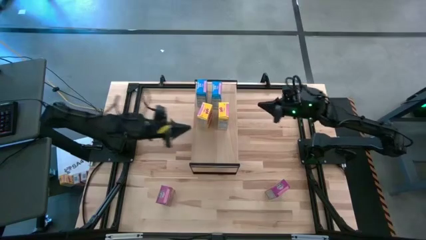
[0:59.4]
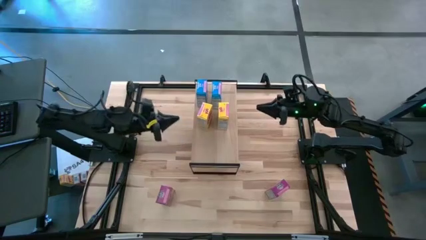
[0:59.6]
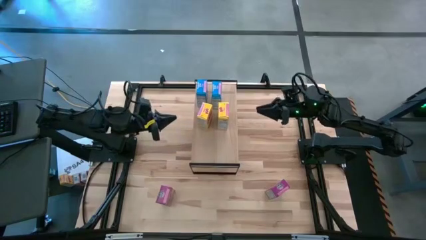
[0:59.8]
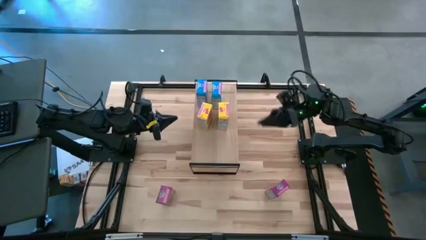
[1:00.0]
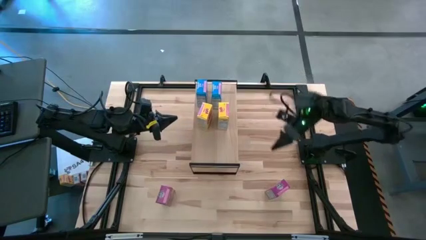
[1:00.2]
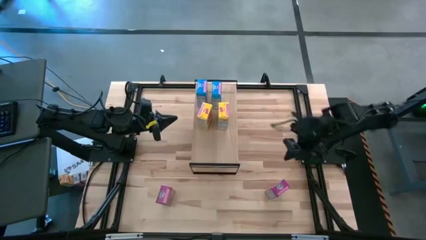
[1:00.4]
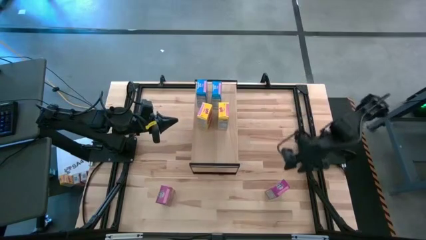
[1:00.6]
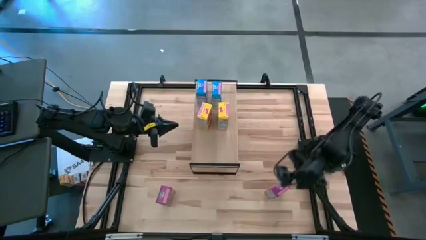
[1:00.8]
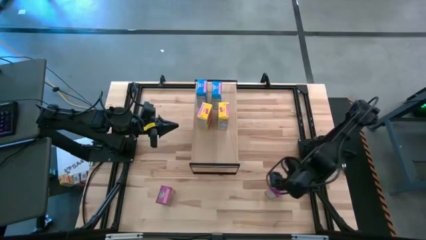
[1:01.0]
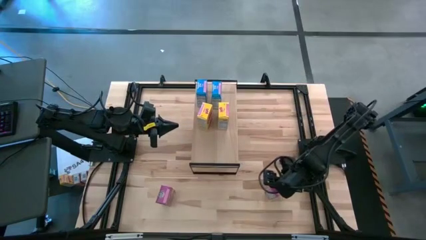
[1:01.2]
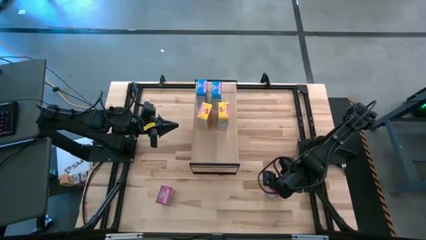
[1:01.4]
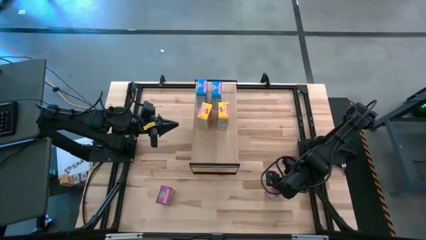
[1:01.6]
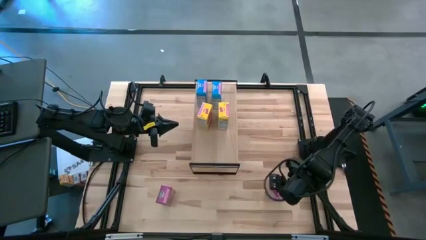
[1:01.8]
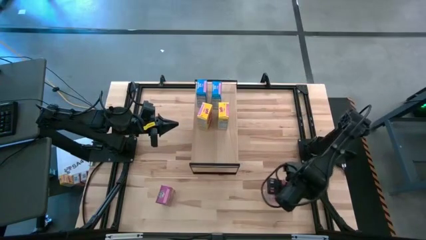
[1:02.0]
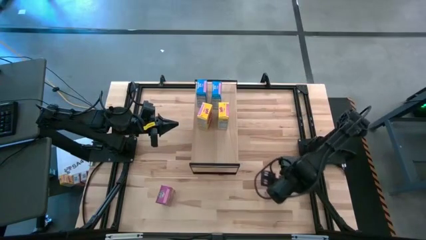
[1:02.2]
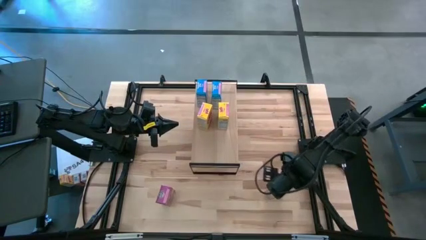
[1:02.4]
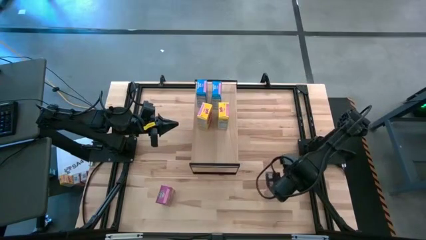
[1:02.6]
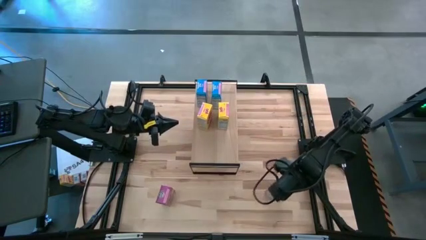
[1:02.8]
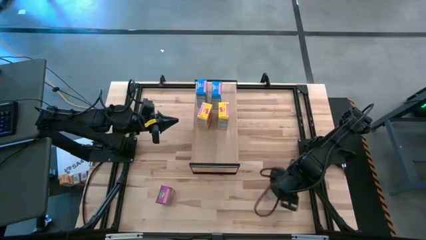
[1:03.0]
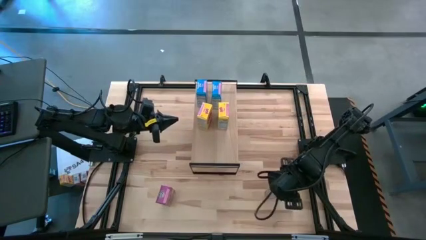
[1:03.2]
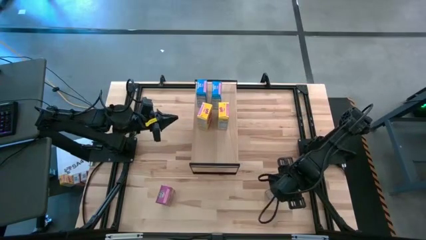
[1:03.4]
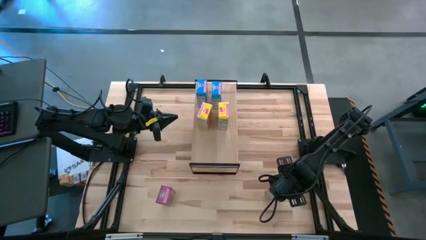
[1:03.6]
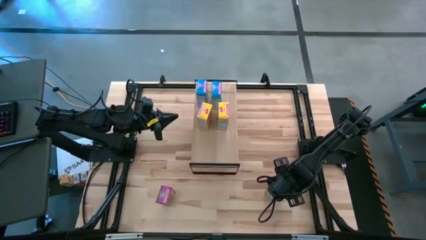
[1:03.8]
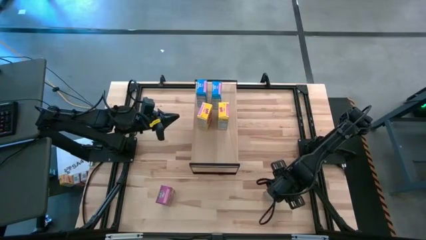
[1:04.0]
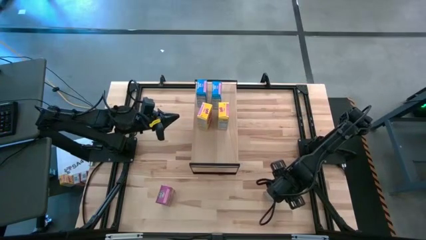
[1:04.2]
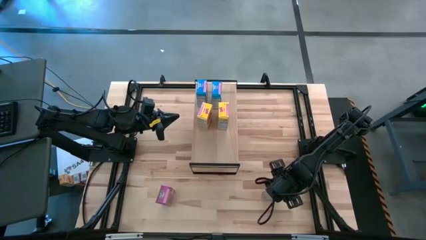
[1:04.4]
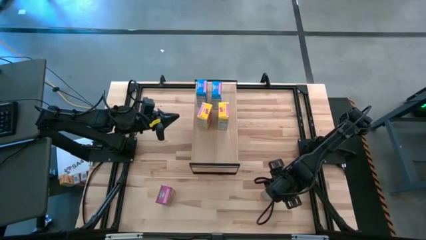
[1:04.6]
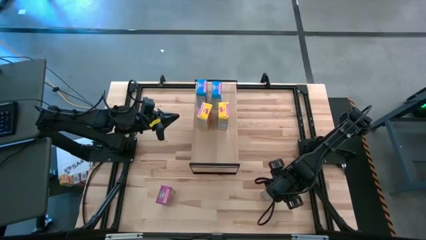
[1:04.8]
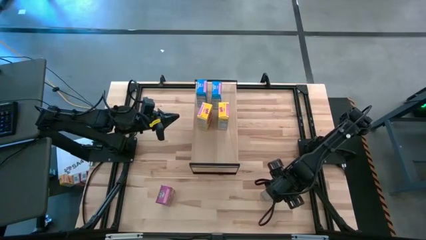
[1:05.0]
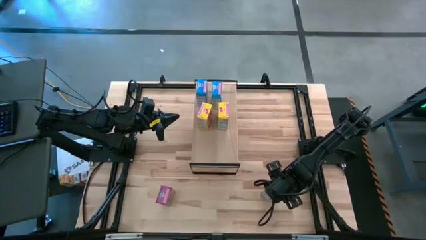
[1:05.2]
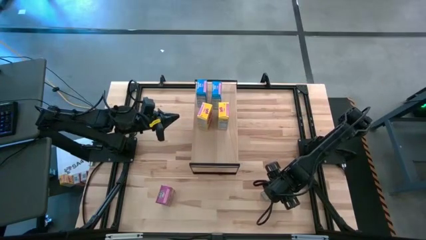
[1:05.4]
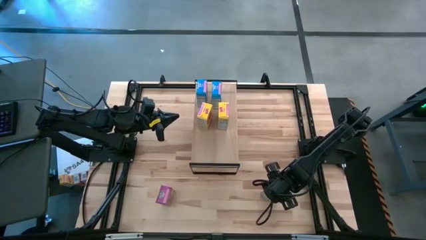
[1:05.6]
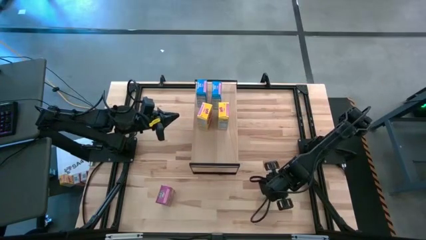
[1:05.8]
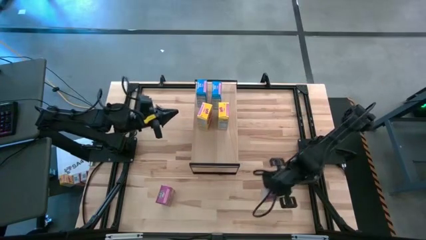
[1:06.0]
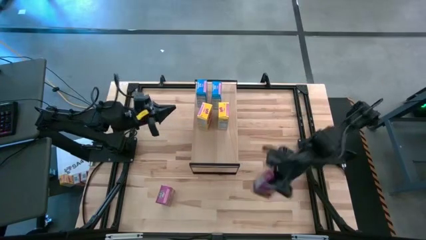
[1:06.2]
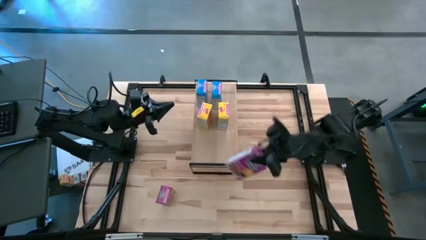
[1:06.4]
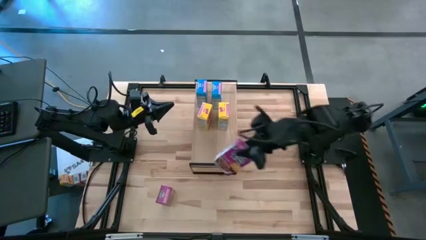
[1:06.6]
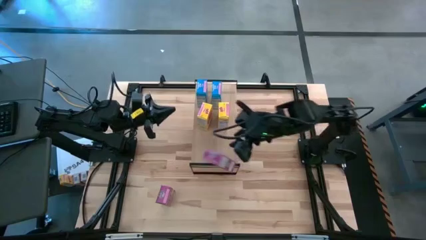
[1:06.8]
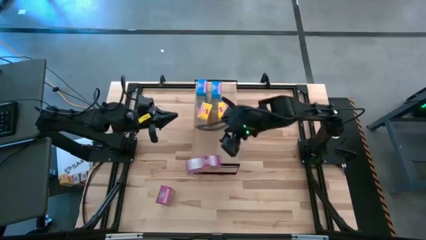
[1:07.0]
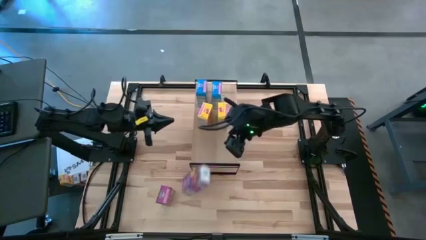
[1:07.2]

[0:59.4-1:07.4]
Task: Stack cereal on shelf
Put the right purple cereal box on the shelf

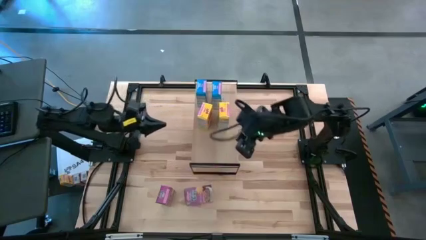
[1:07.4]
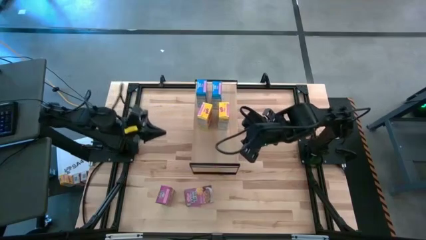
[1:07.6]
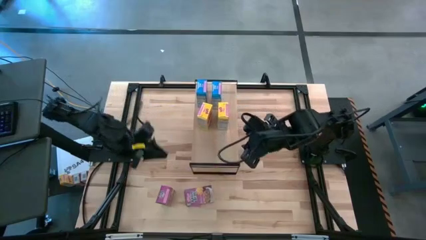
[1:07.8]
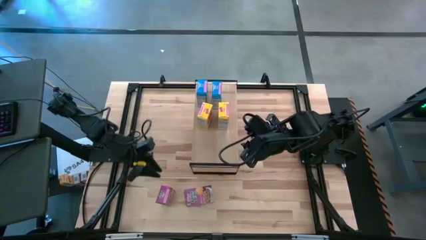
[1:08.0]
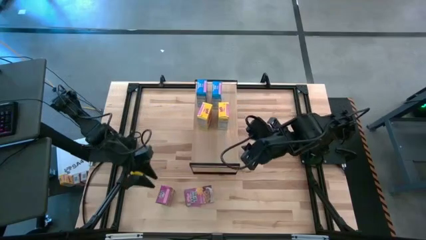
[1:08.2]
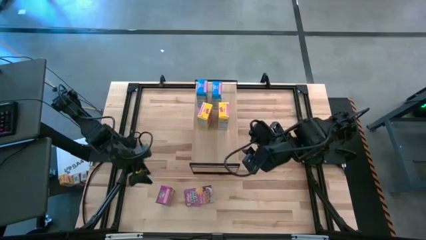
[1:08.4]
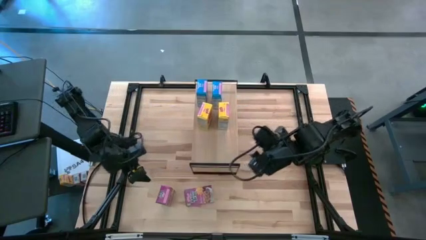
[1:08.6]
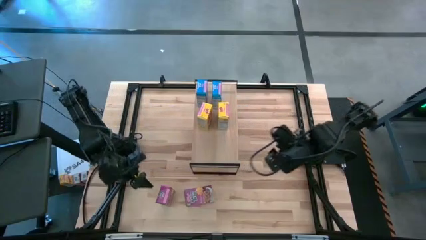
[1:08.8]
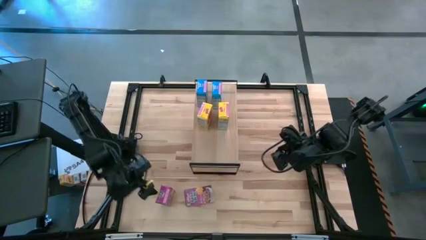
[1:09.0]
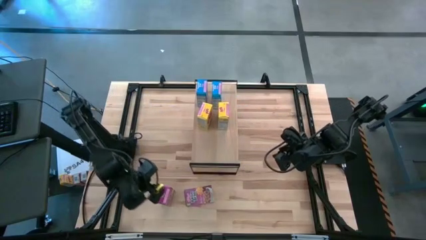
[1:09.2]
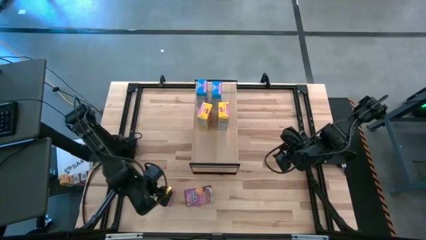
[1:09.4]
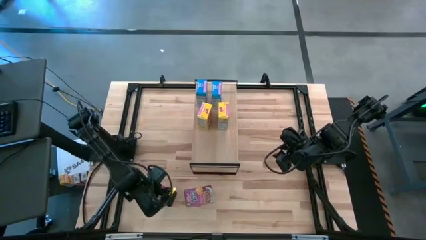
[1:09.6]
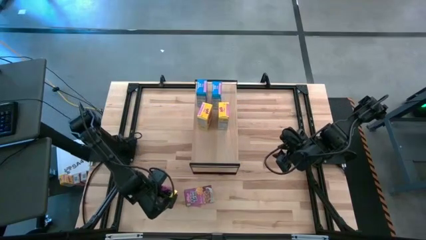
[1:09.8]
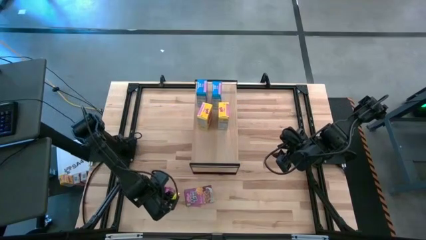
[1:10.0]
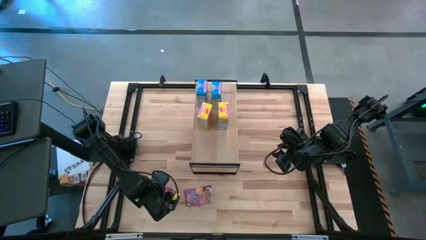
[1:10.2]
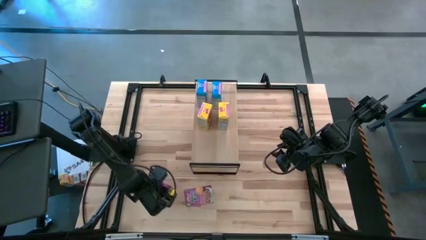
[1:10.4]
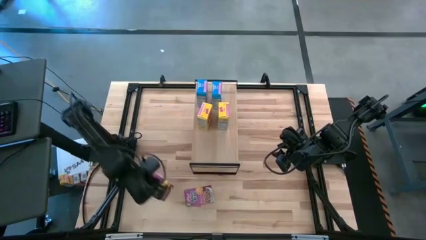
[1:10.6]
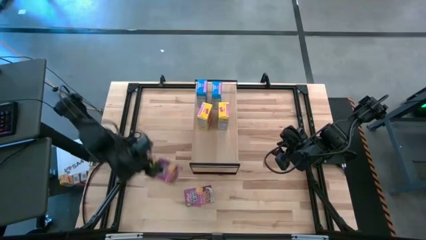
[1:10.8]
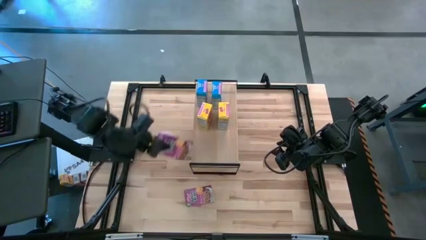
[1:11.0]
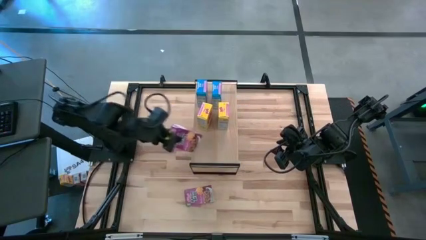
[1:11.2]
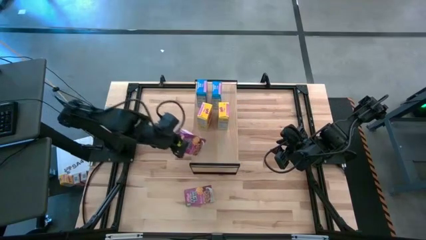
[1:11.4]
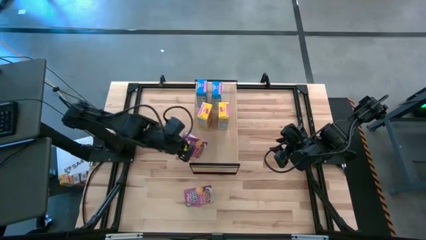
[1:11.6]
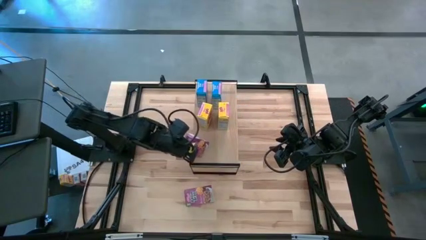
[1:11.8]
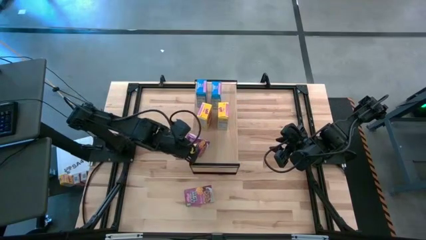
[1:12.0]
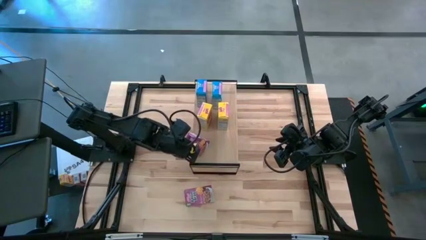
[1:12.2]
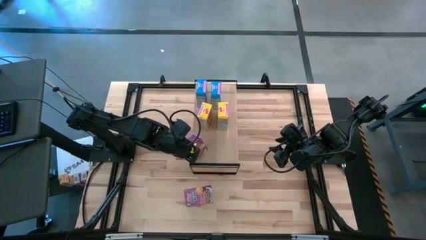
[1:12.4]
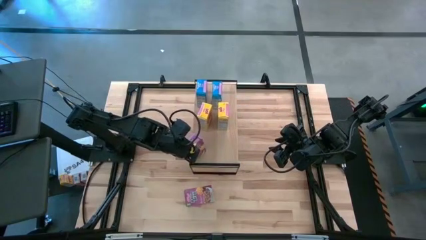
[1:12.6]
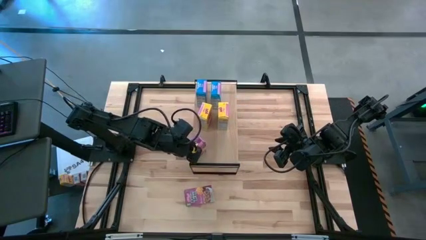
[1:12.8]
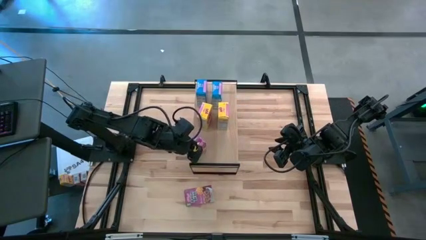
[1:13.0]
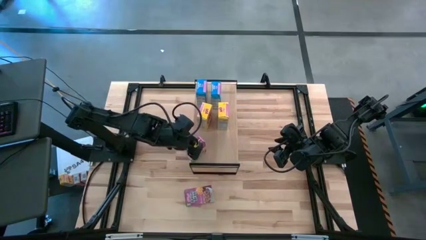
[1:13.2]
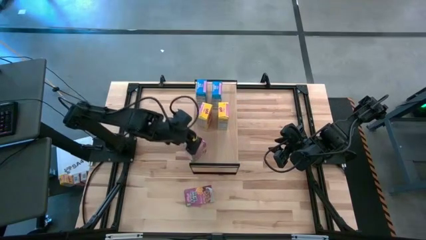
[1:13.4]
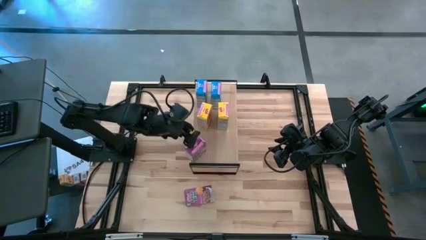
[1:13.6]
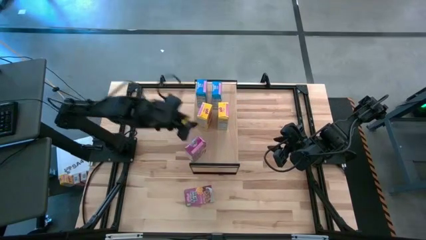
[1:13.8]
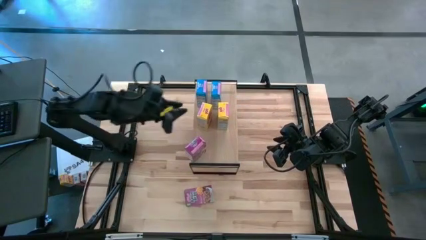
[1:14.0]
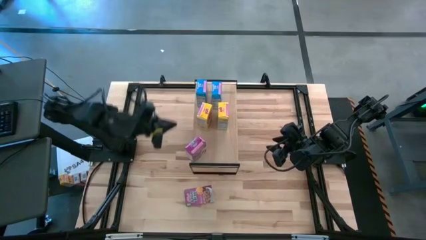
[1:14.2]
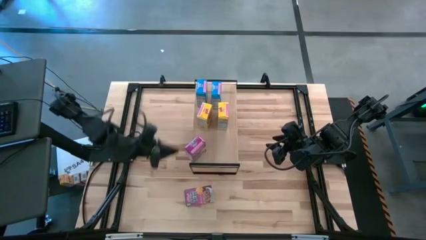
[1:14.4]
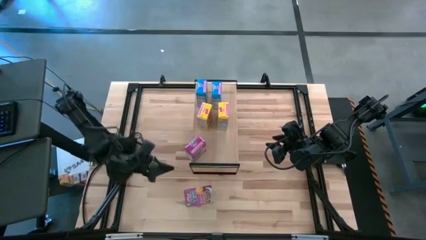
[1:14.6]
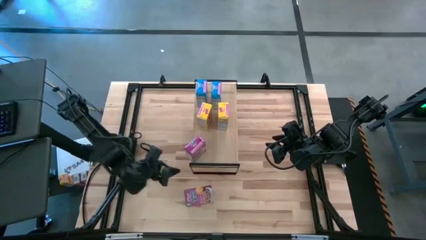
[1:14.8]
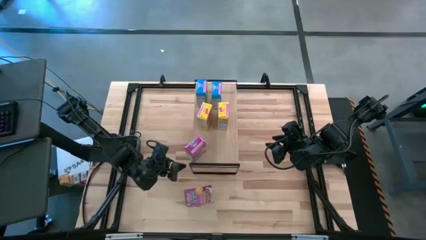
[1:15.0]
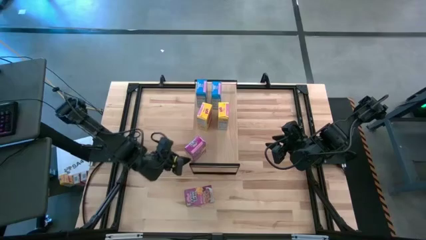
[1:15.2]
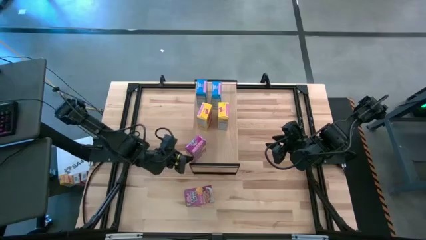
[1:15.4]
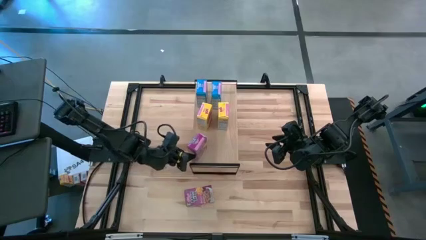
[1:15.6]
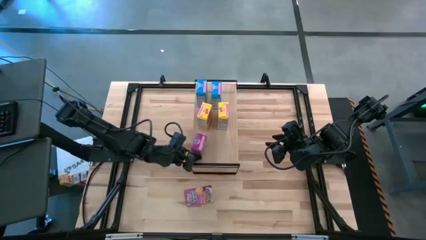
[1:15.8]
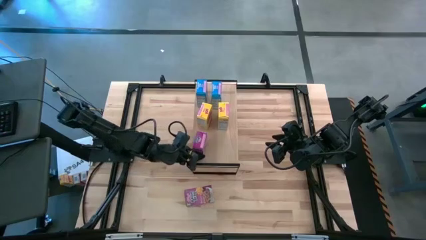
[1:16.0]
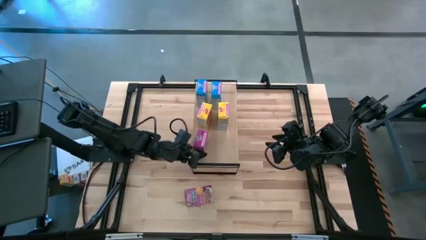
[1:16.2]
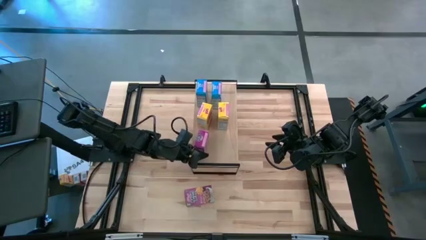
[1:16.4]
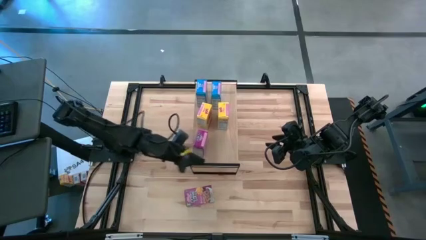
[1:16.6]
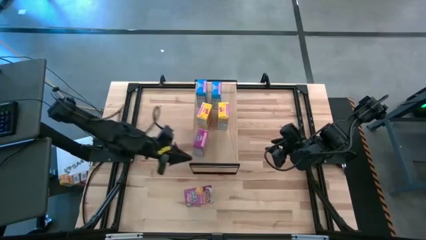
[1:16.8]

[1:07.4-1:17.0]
Put the left purple cereal box on the shelf
